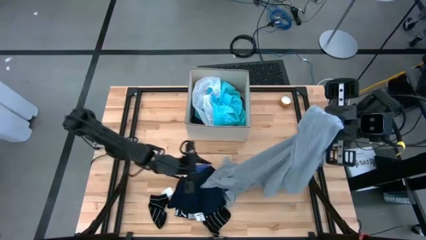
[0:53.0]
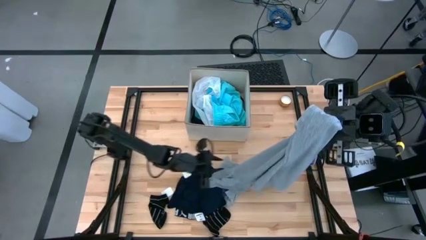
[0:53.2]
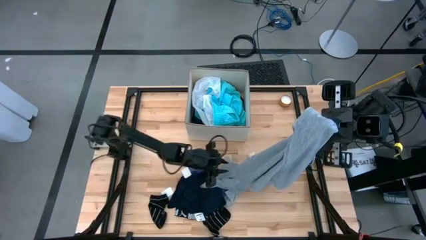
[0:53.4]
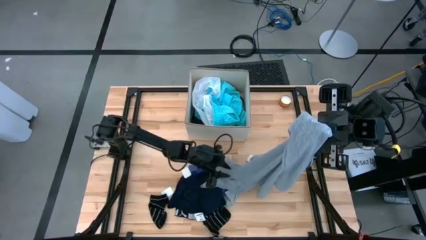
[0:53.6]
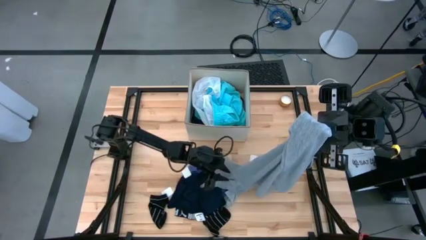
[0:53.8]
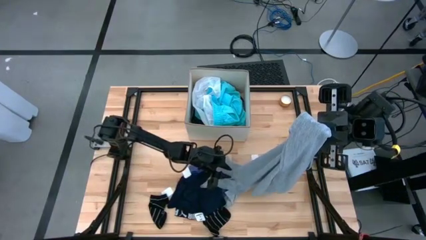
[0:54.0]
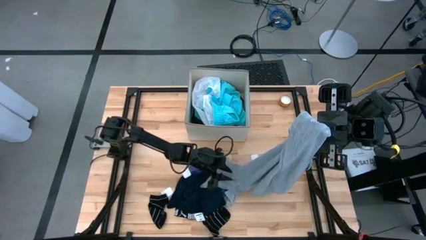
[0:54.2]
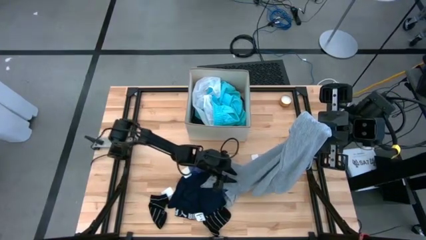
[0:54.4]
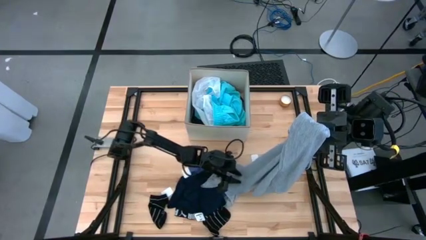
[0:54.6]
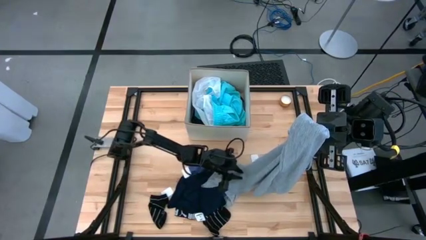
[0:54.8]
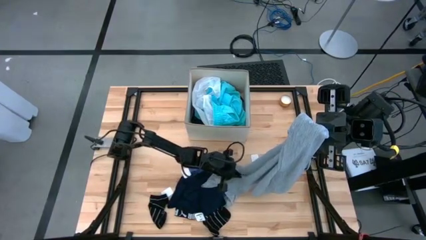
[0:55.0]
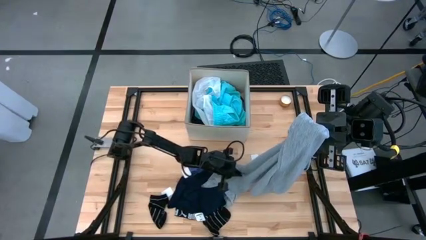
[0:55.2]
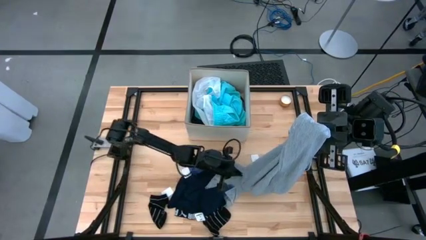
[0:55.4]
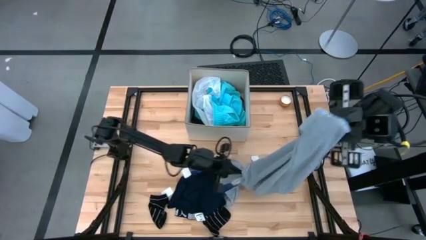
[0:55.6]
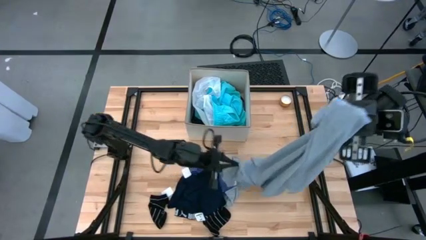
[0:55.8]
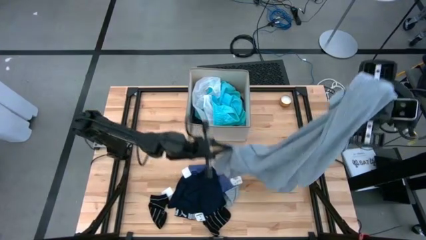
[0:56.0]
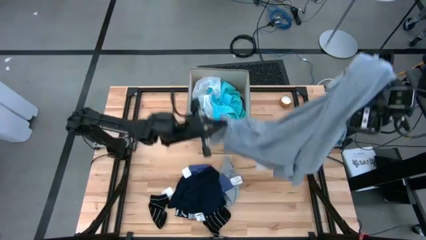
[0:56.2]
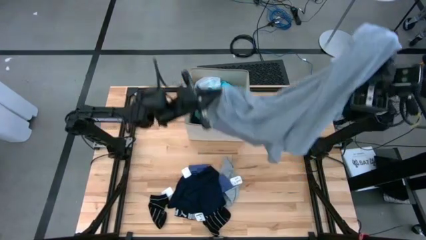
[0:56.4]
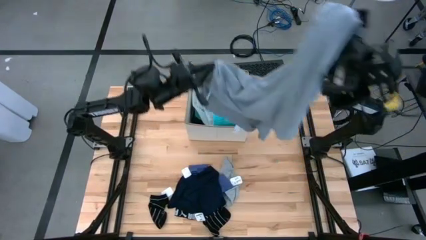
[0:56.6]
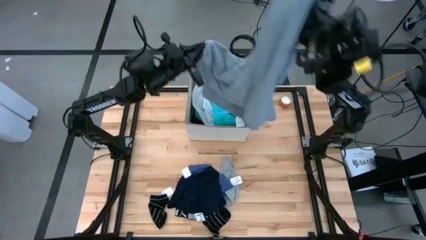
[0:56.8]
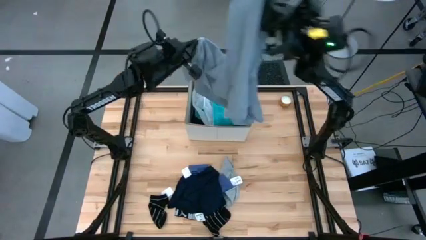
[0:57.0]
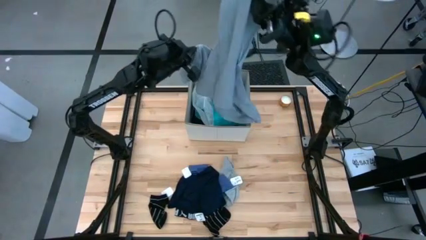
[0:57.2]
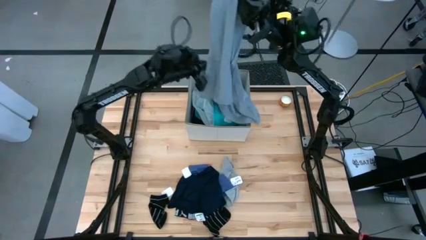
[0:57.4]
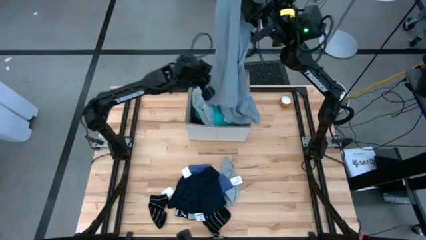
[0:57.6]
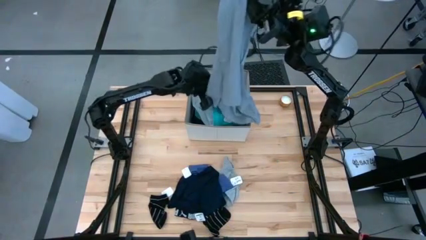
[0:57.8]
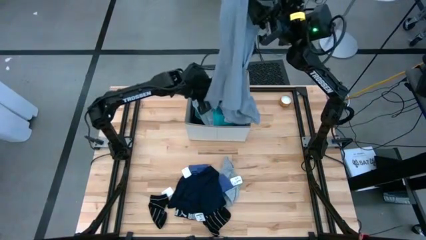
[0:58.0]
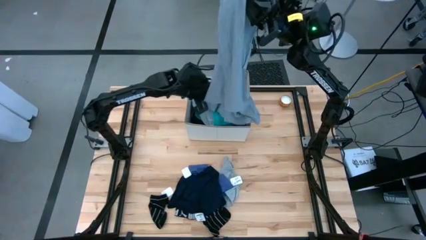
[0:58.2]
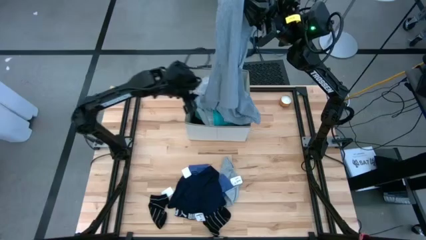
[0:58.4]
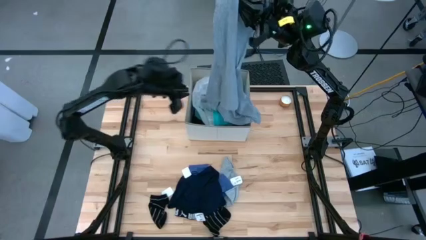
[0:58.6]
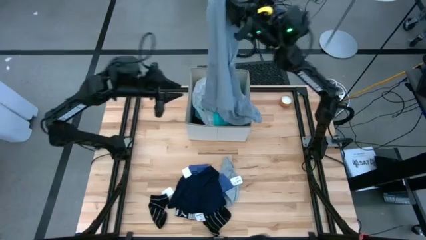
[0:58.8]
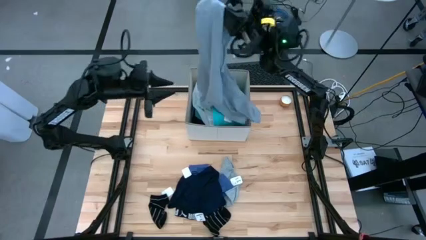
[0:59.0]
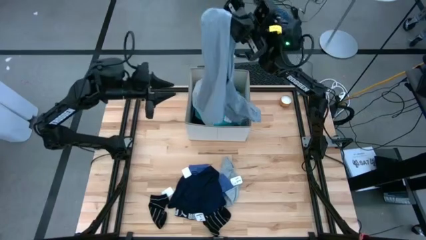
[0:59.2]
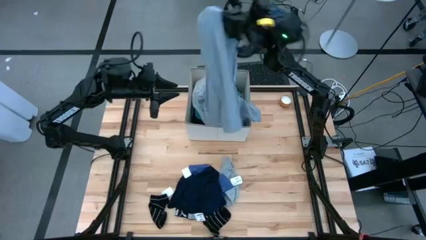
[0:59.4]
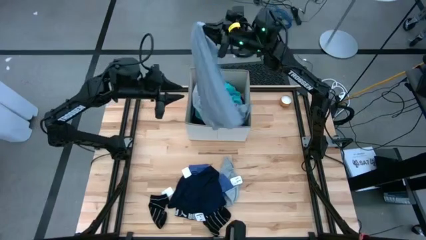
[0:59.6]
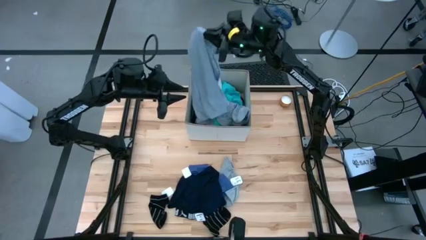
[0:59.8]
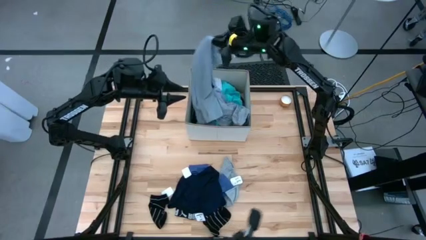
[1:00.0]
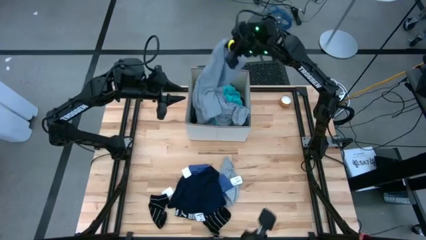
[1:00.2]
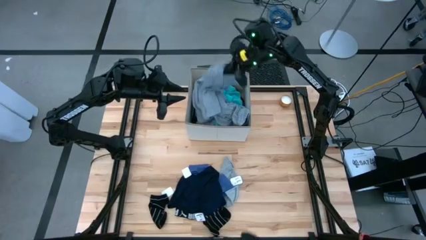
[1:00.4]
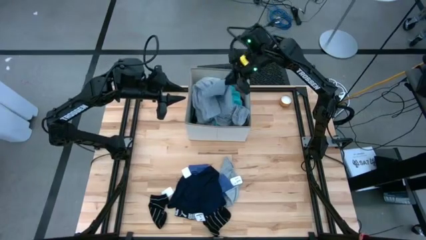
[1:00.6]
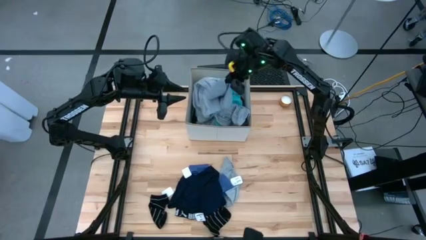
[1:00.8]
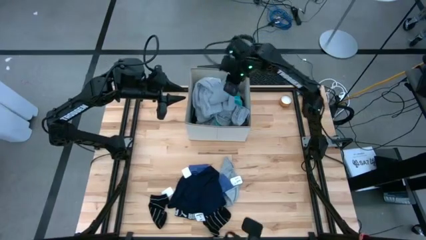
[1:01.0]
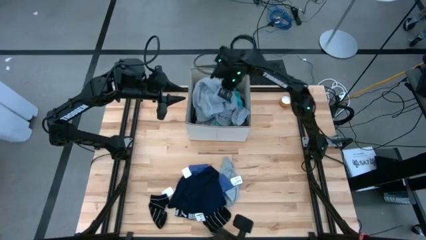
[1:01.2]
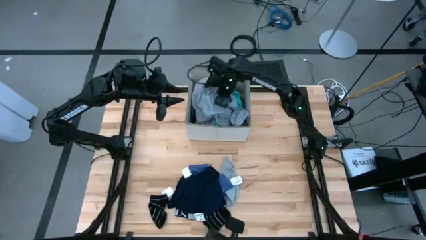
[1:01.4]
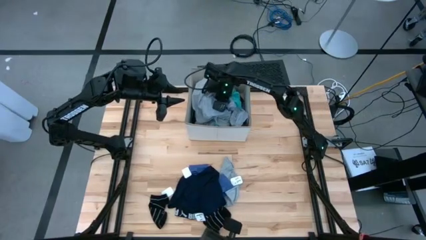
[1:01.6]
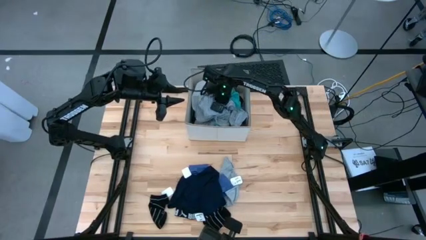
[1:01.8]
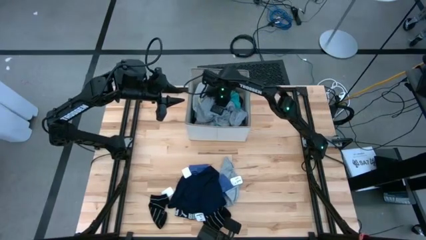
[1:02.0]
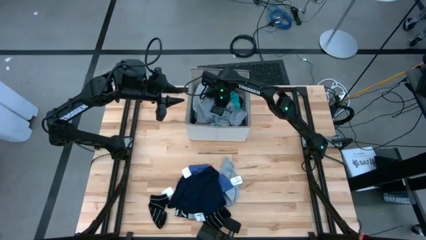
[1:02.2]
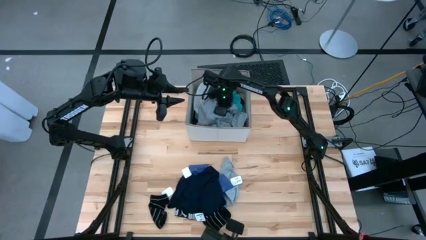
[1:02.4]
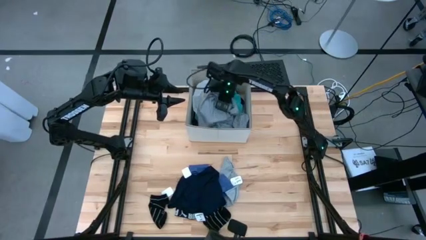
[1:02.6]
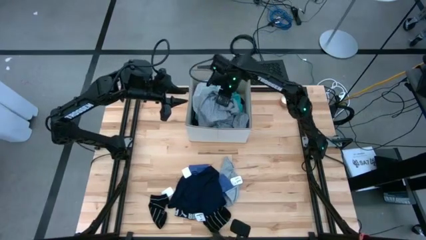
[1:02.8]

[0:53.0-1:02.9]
Task: Sort clothes
Put the gray shirt into the laundry bin

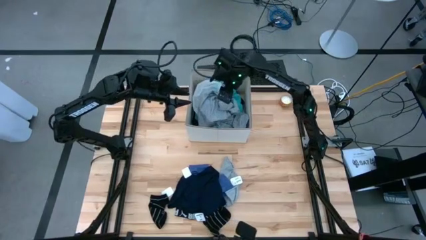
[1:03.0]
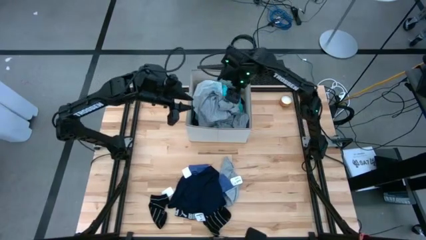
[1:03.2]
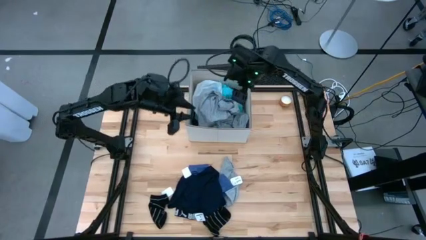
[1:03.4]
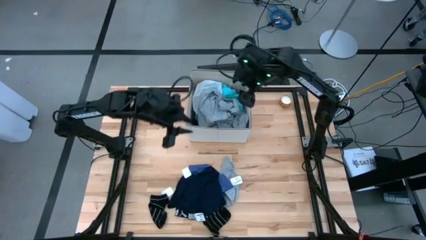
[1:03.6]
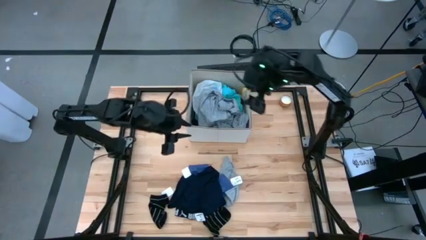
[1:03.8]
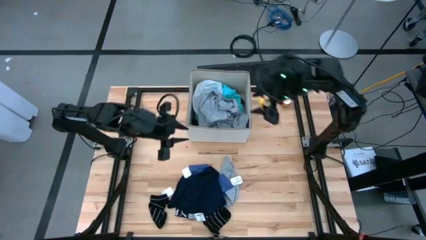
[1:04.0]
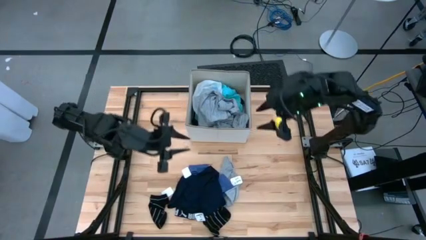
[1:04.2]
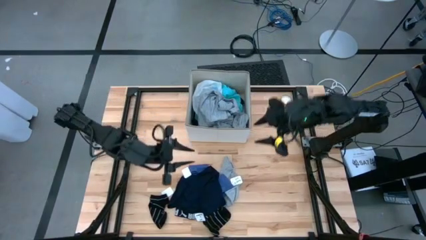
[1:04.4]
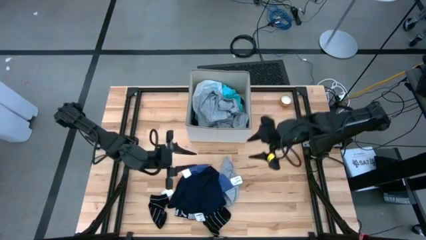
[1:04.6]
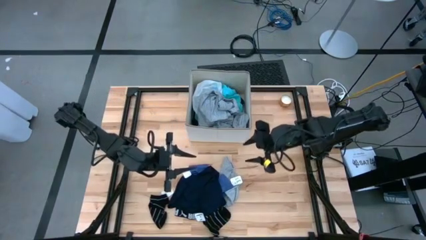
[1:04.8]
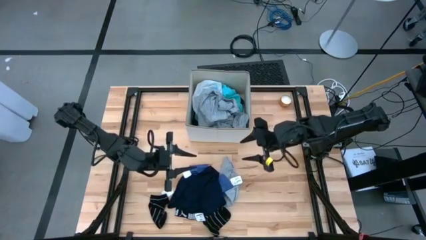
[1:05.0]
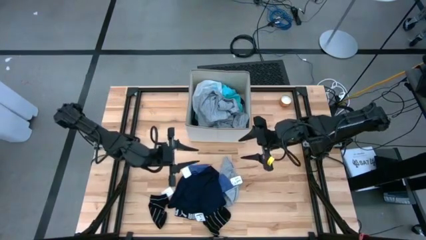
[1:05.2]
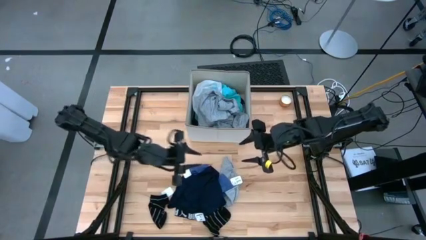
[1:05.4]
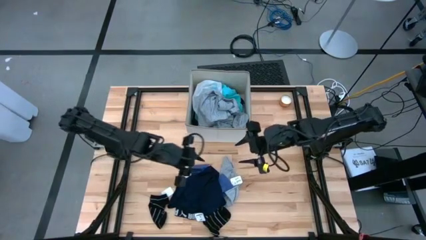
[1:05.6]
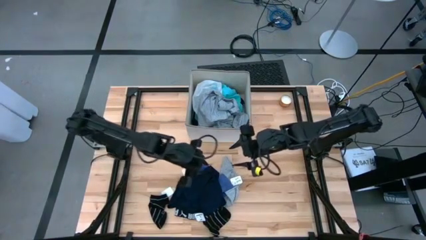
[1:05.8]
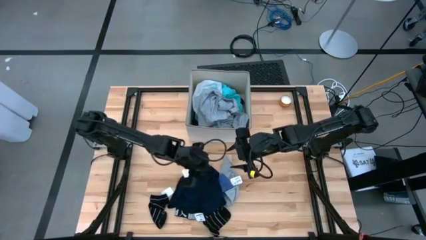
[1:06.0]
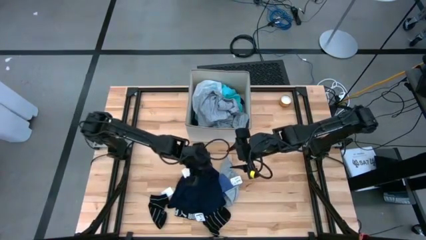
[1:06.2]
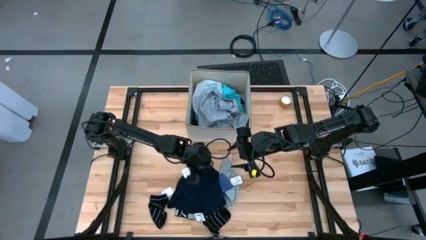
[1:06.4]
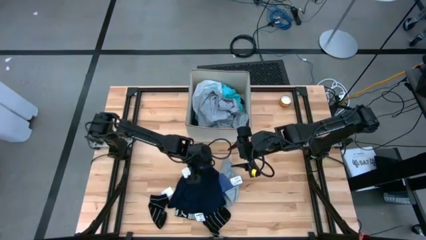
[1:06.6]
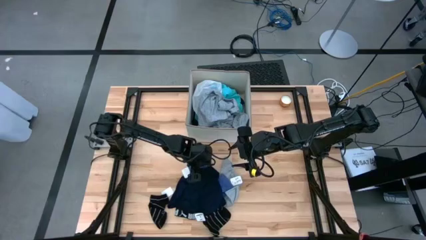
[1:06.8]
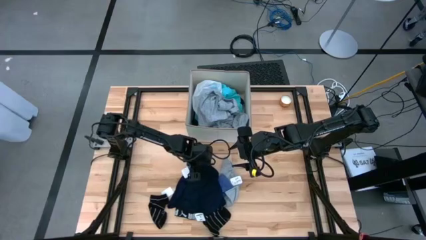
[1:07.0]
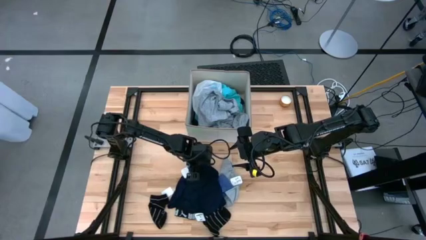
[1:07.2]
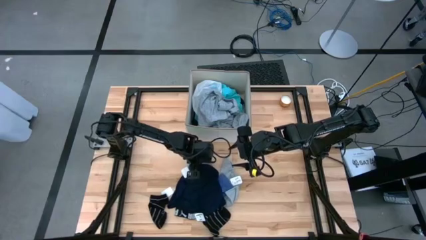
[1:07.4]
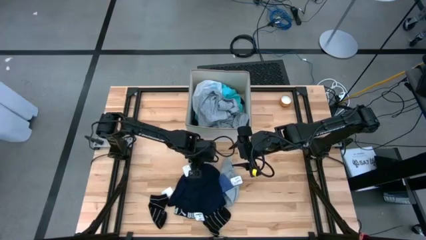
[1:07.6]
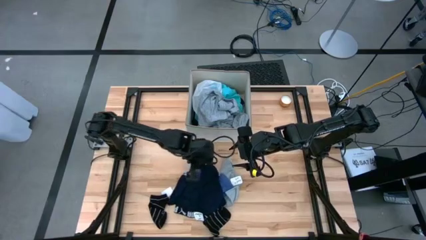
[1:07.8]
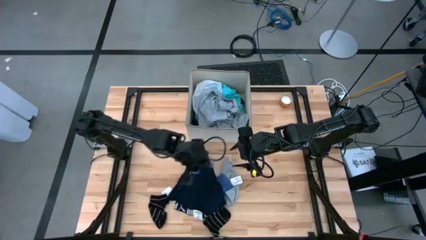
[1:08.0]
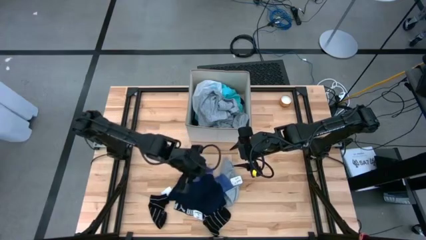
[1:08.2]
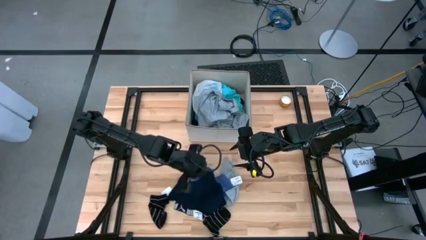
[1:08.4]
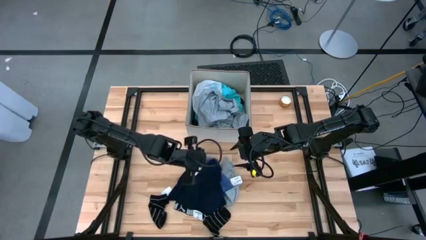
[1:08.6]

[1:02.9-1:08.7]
Put the blue boxer into the laundry bin

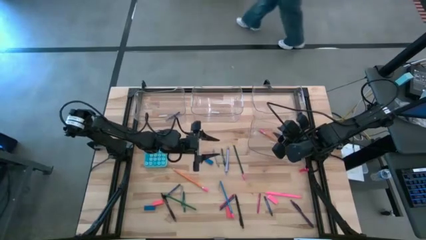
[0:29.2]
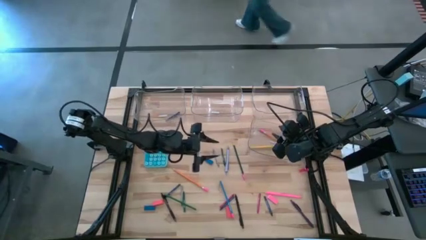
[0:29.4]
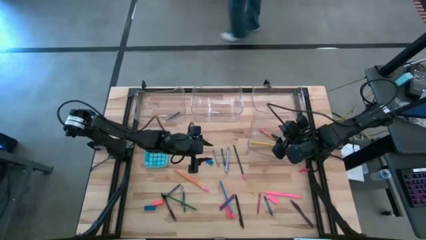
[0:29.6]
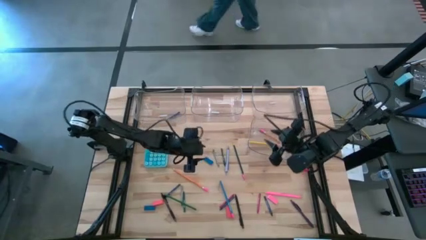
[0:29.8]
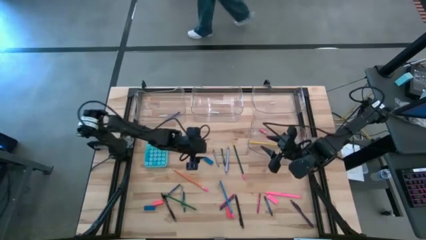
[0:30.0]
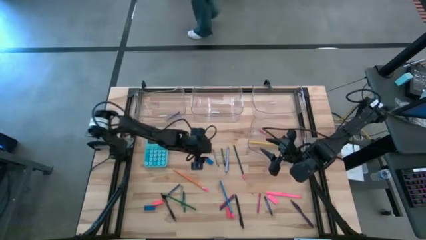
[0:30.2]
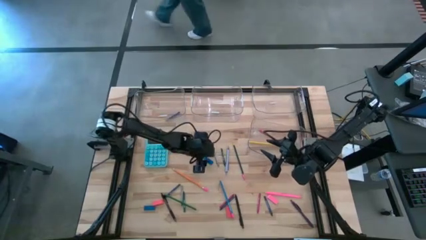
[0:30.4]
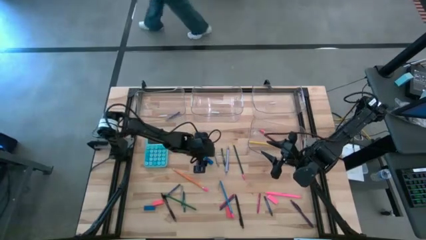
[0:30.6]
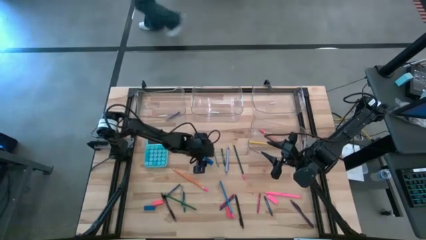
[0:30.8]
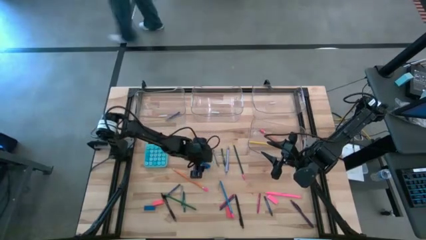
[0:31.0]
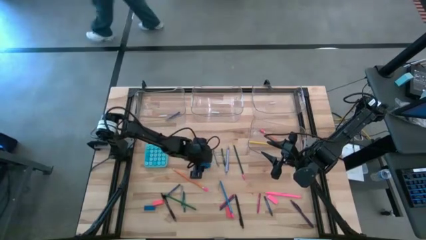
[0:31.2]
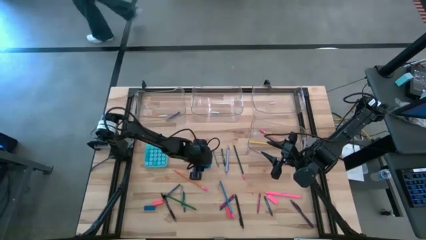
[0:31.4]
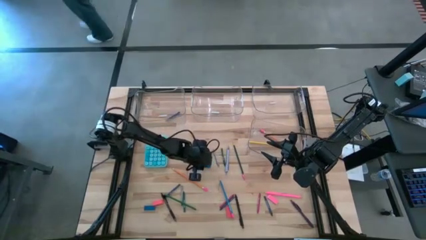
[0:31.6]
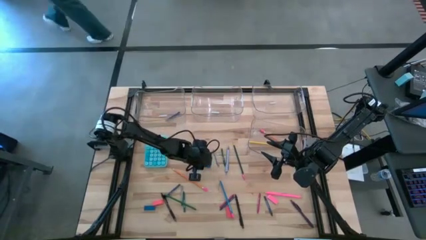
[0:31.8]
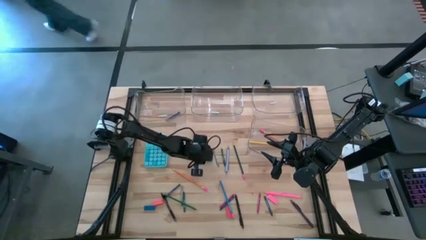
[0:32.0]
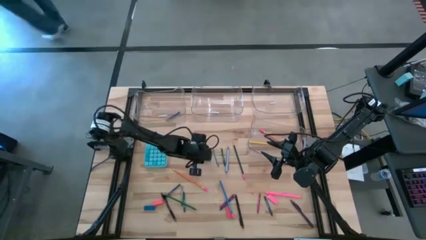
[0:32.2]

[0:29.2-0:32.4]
Task: Sort crayons/erasers/pens/pencils in bins
Put the top blue eraser into the top center transparent bin
